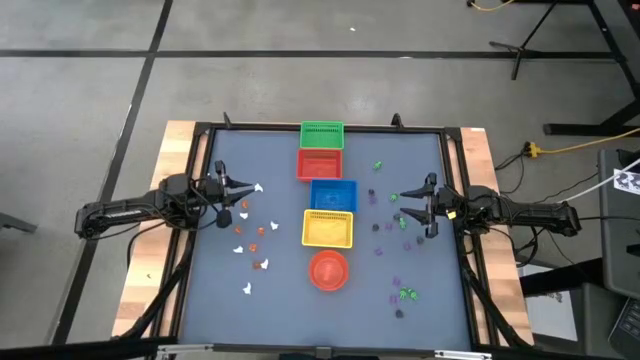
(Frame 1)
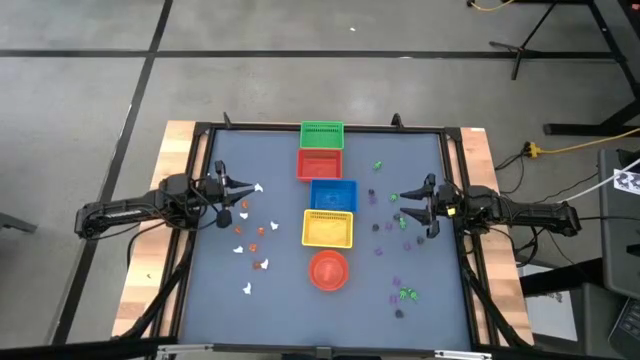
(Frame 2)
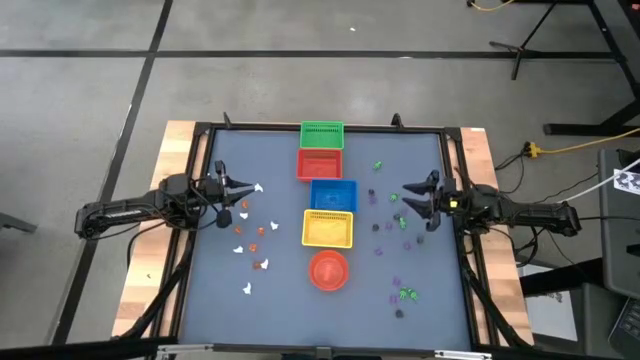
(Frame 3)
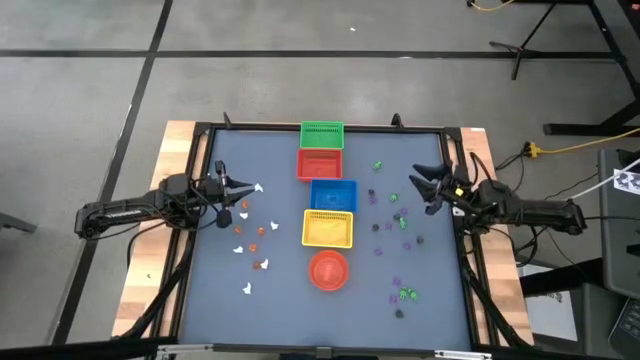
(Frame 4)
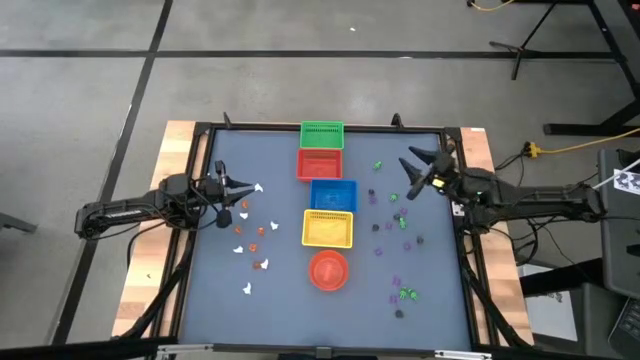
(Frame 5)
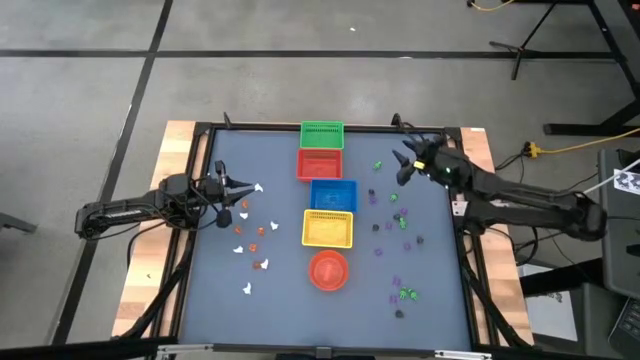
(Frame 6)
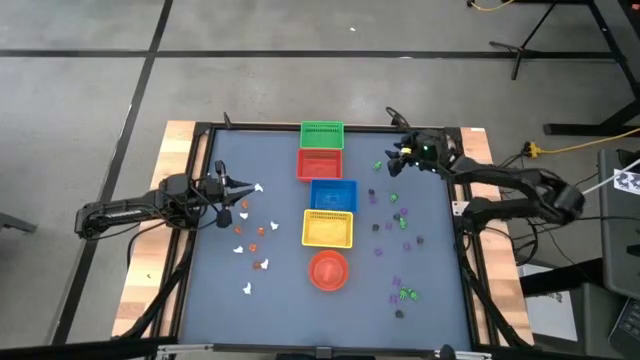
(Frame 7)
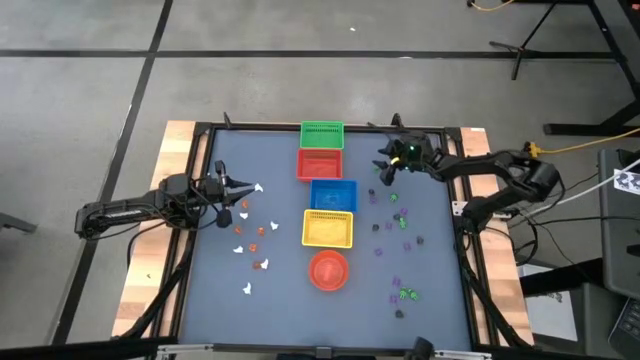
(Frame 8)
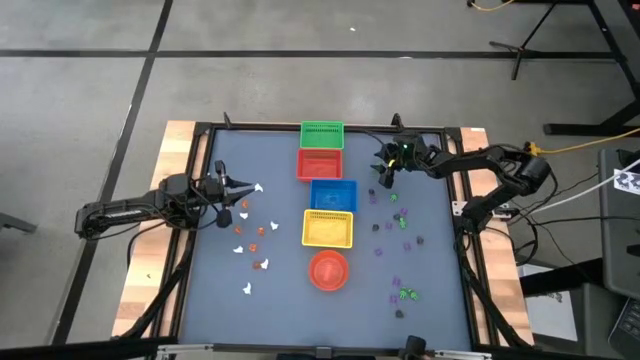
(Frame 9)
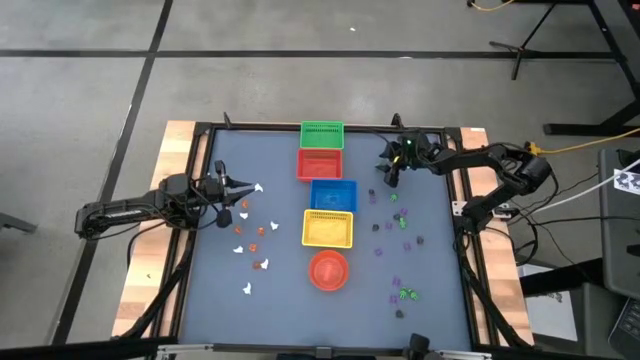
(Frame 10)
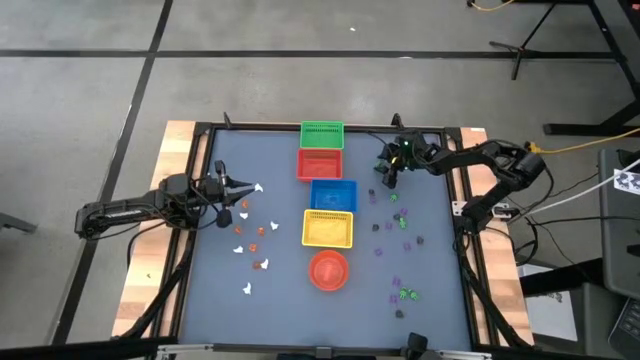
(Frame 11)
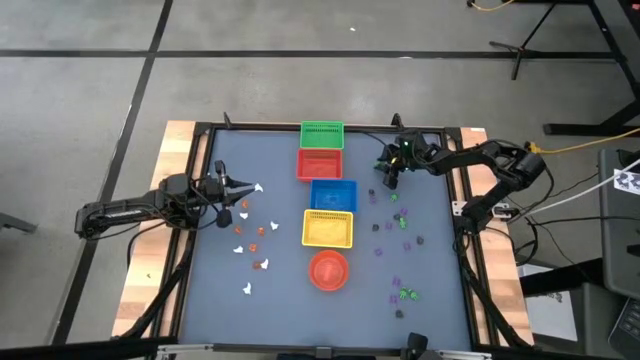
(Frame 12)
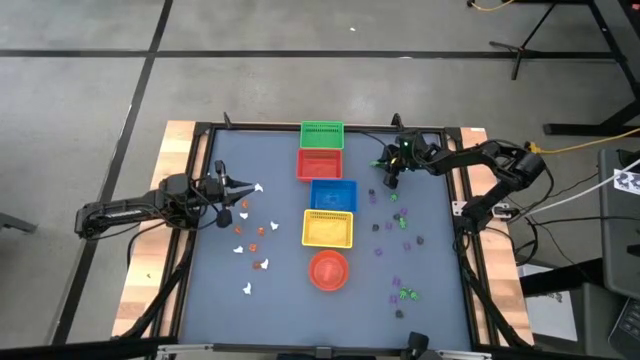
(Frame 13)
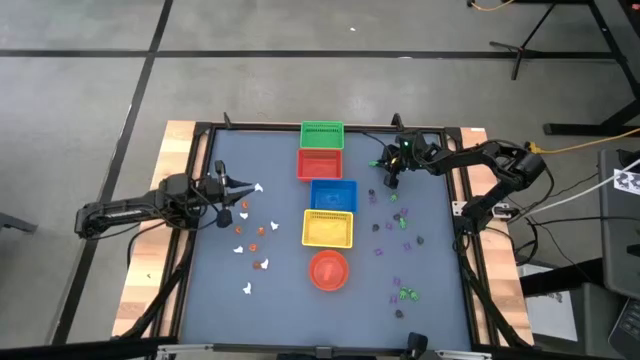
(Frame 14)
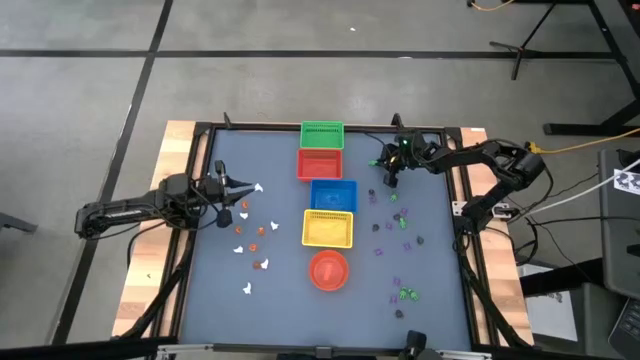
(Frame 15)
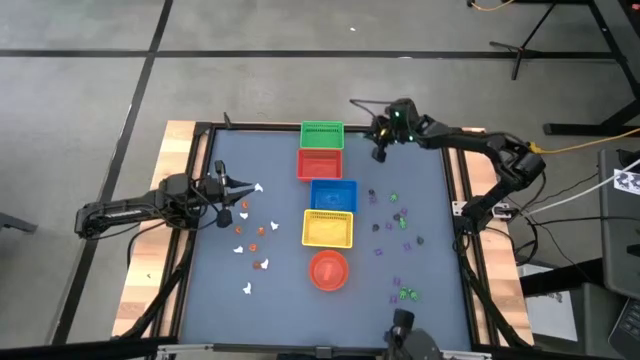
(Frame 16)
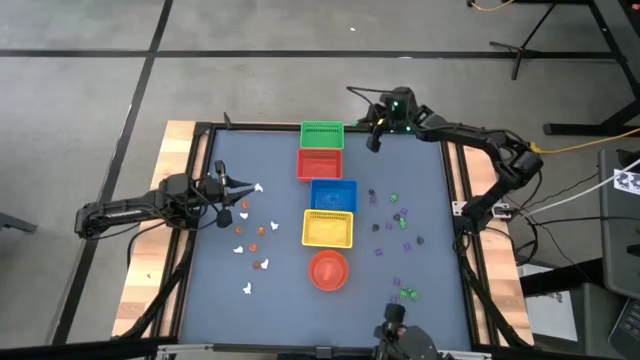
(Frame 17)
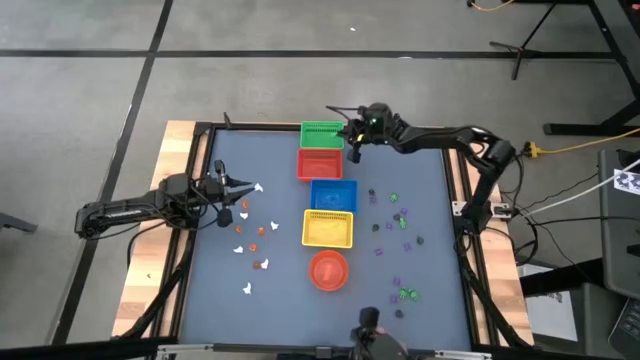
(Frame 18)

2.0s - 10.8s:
Task: Sort Halloween decoration
Put the green skeleton toy into the green bin

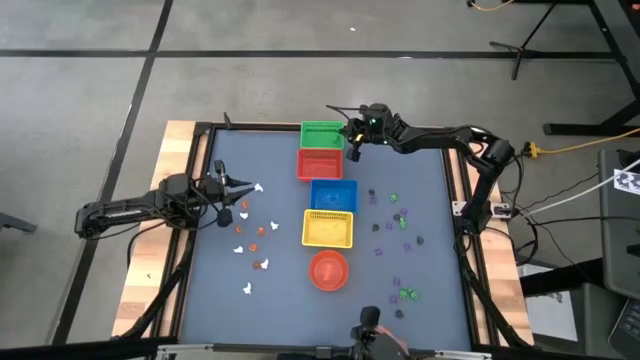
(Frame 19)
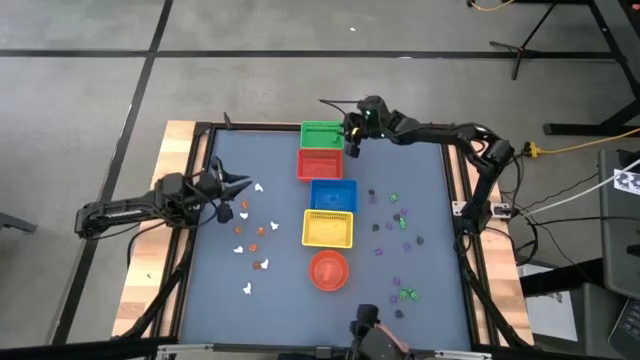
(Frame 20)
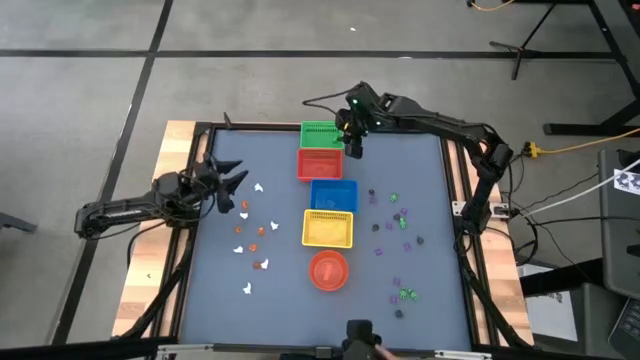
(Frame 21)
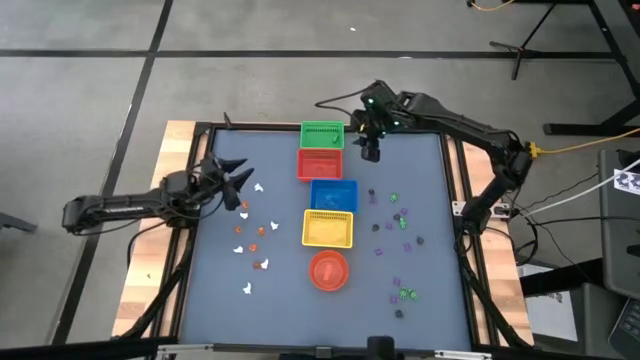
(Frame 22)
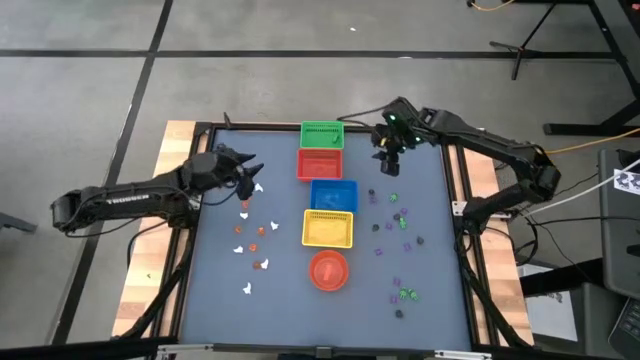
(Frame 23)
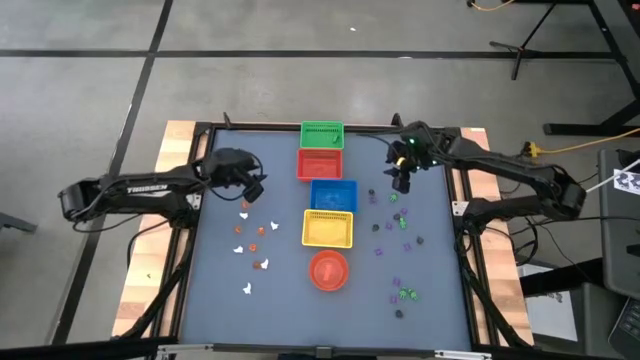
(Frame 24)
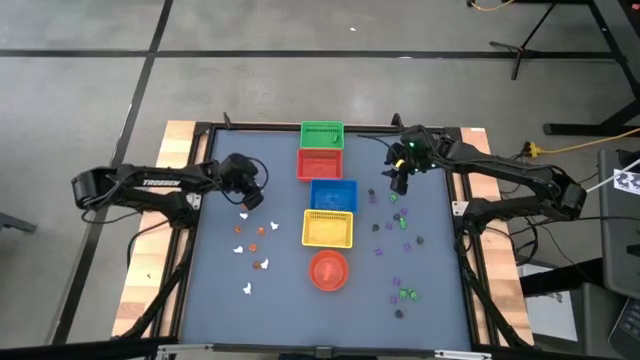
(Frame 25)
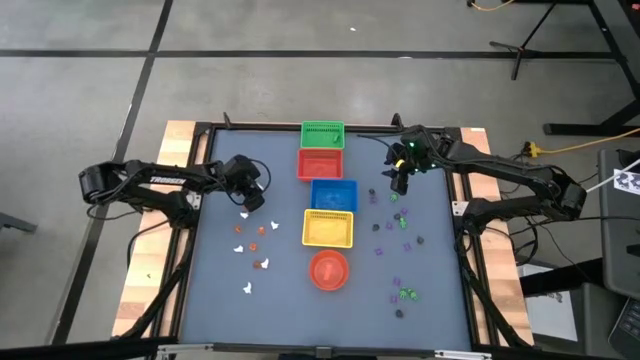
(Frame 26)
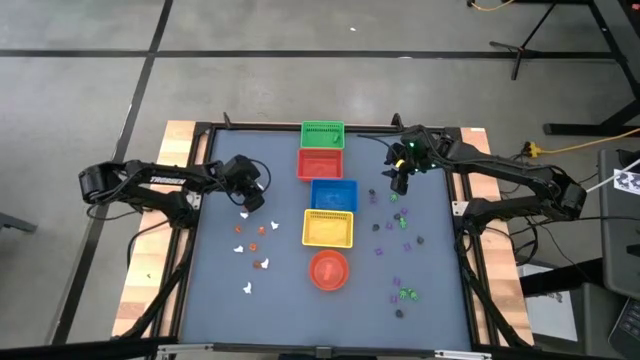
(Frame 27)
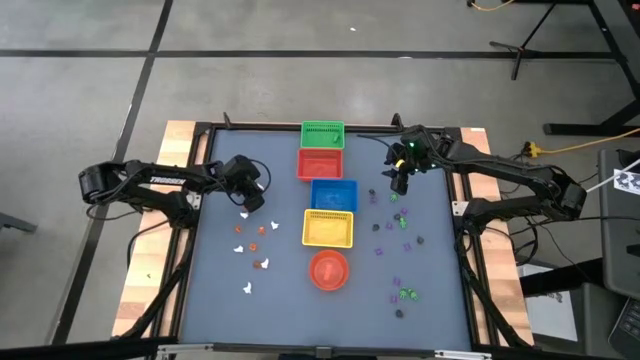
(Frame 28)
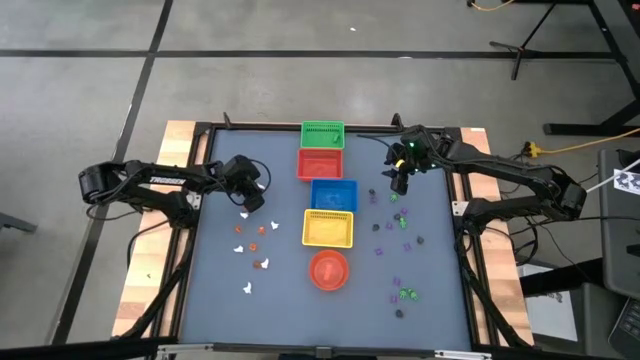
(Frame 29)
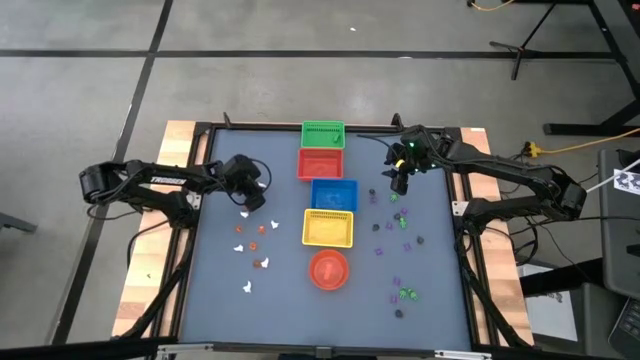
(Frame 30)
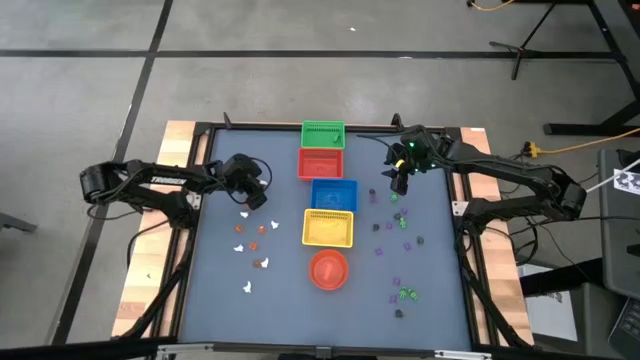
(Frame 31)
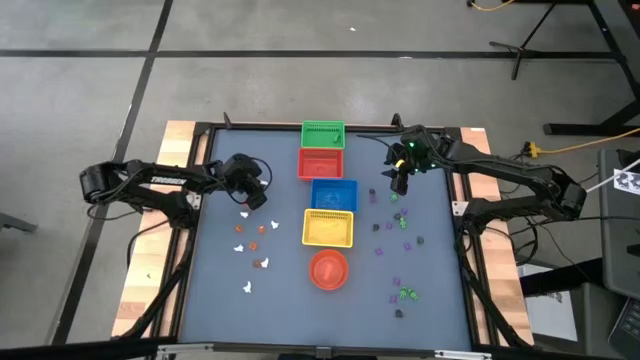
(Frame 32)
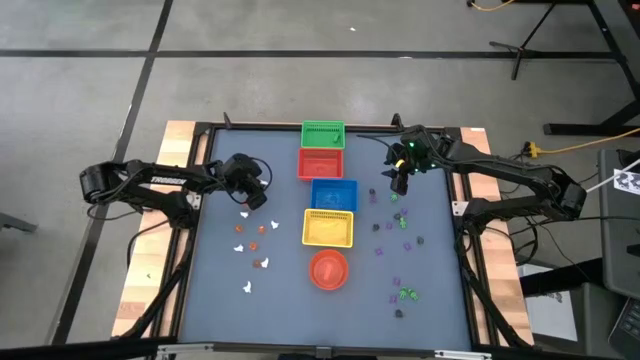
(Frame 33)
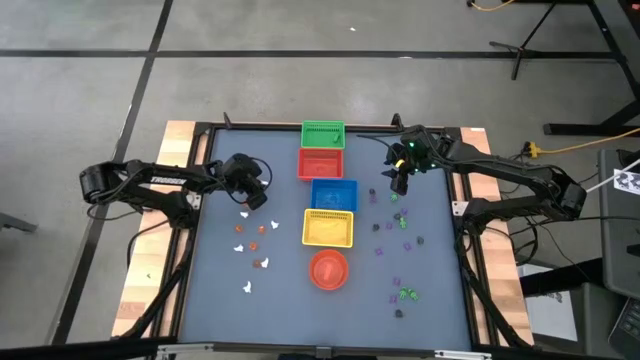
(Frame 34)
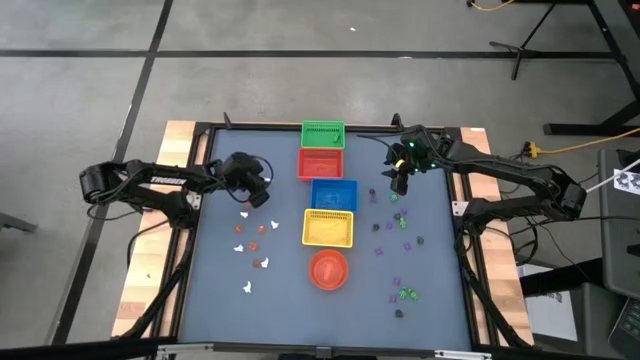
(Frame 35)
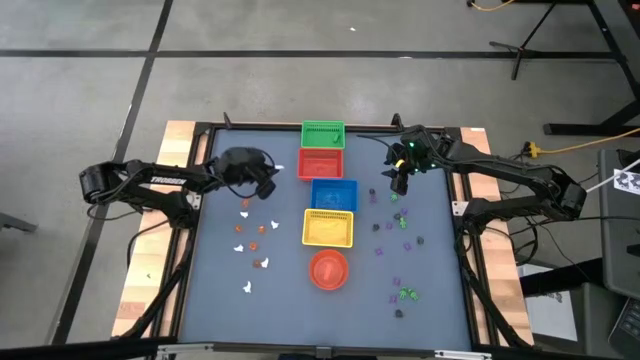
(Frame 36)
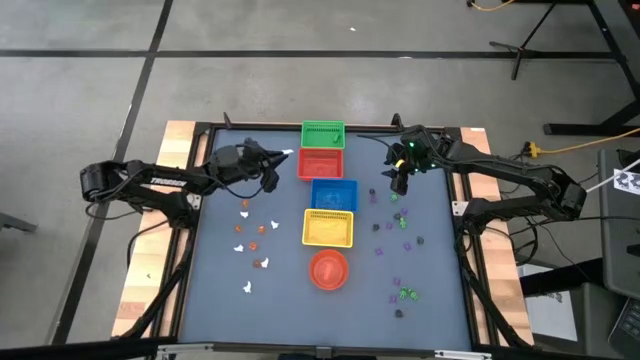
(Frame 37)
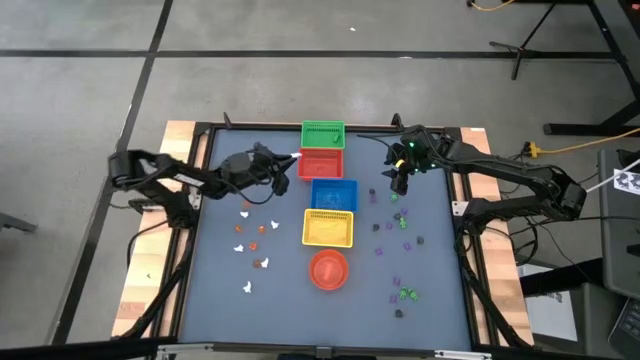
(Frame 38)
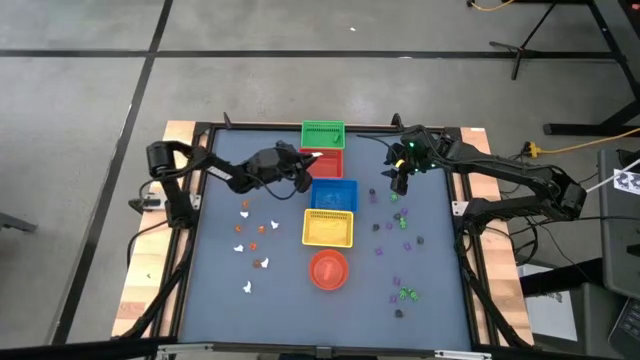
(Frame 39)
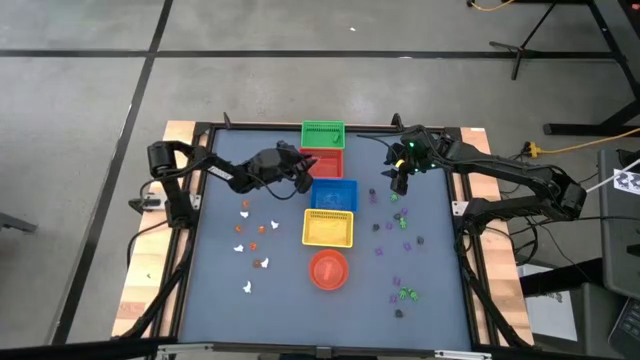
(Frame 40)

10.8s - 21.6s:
Put the white ghost toy into the red bin
